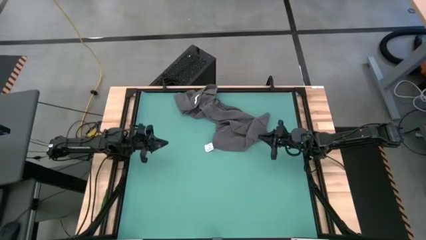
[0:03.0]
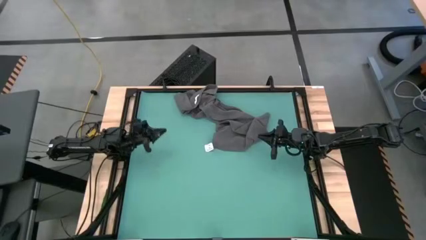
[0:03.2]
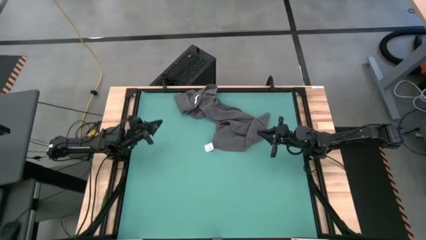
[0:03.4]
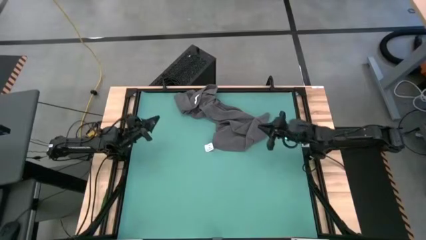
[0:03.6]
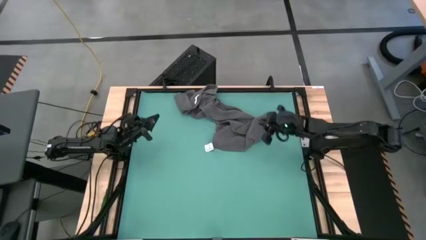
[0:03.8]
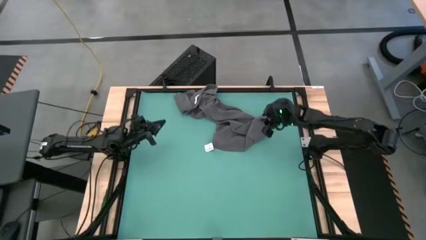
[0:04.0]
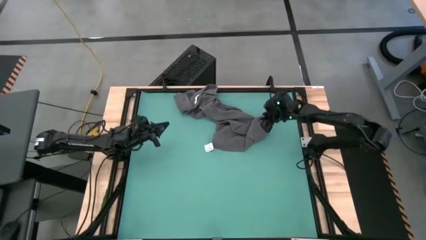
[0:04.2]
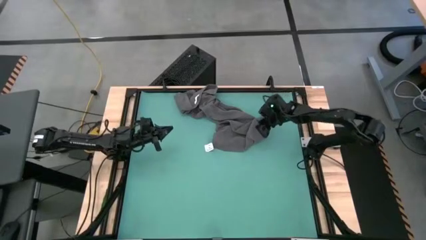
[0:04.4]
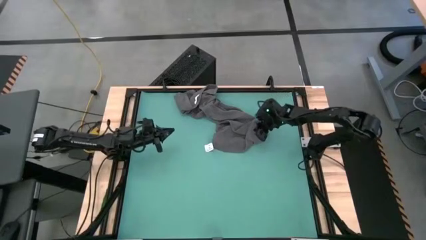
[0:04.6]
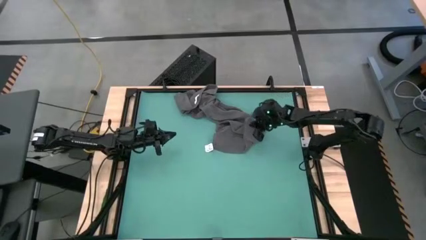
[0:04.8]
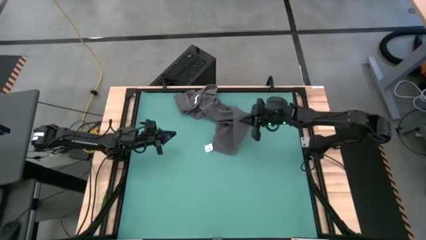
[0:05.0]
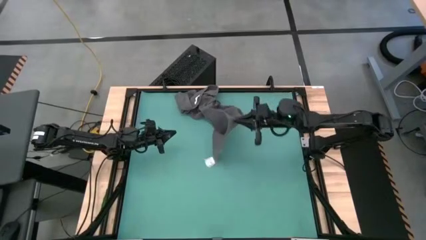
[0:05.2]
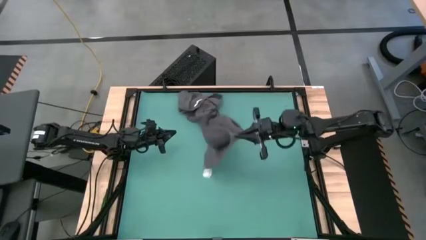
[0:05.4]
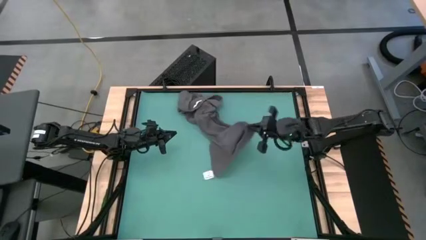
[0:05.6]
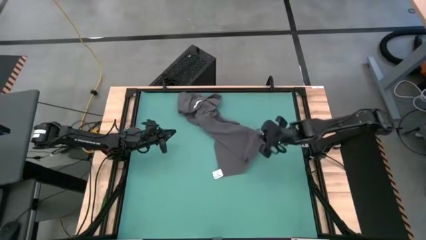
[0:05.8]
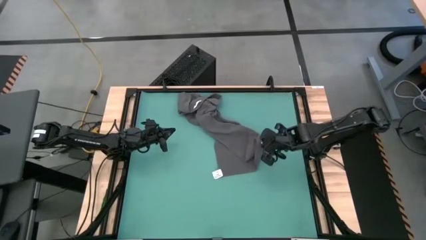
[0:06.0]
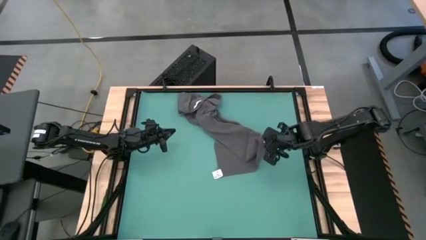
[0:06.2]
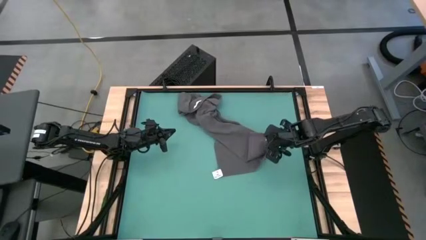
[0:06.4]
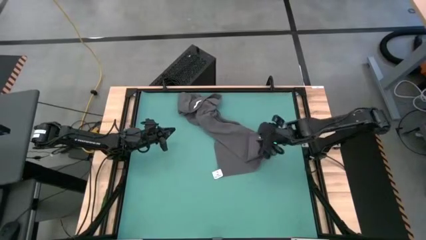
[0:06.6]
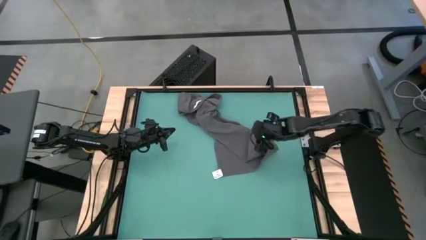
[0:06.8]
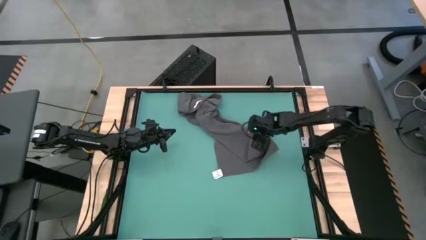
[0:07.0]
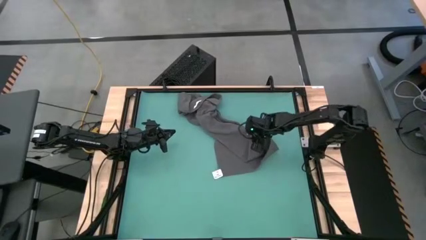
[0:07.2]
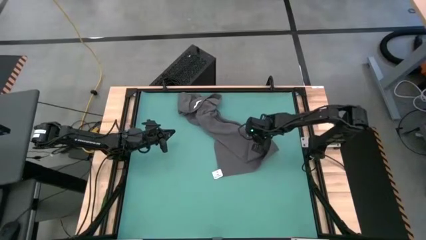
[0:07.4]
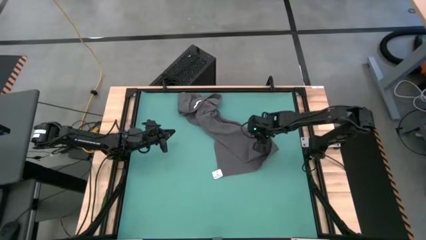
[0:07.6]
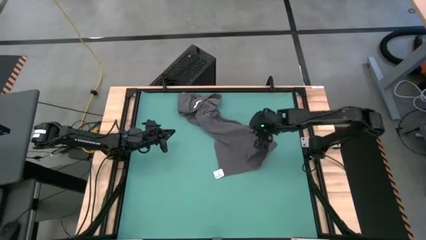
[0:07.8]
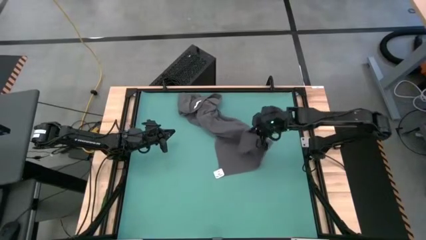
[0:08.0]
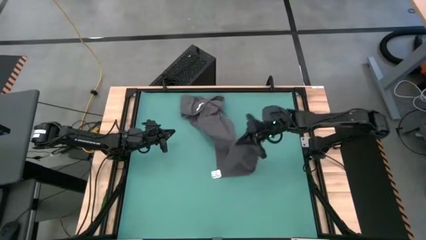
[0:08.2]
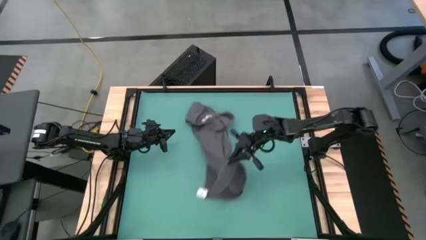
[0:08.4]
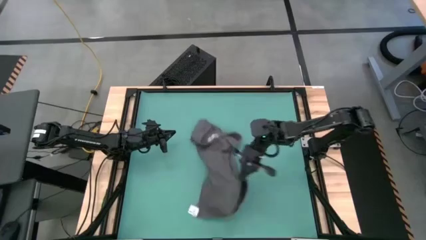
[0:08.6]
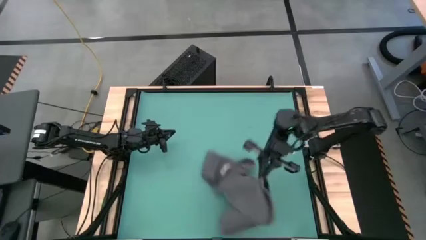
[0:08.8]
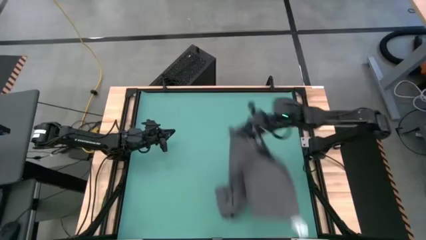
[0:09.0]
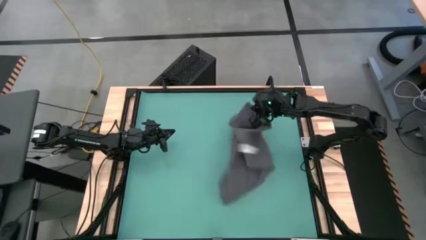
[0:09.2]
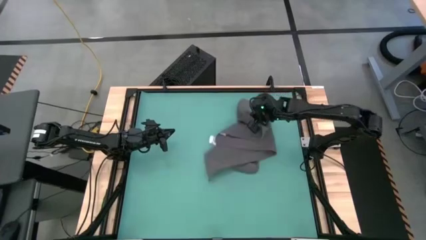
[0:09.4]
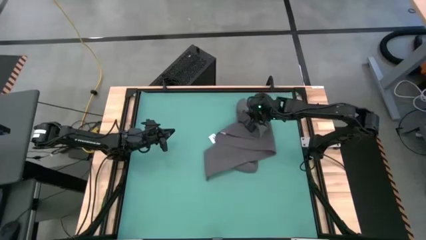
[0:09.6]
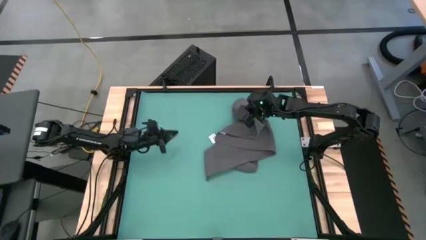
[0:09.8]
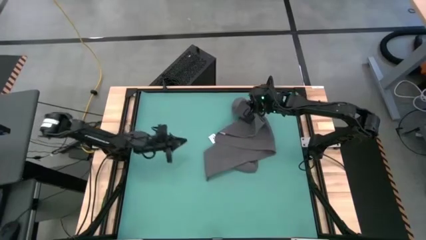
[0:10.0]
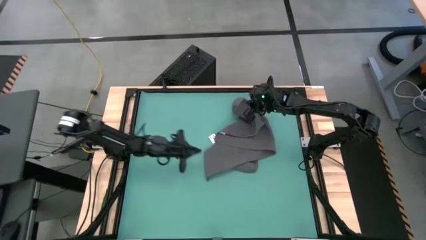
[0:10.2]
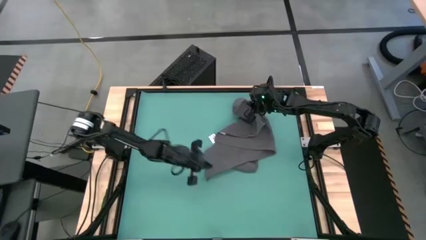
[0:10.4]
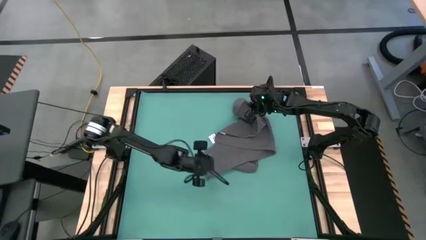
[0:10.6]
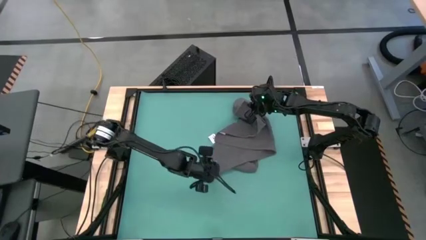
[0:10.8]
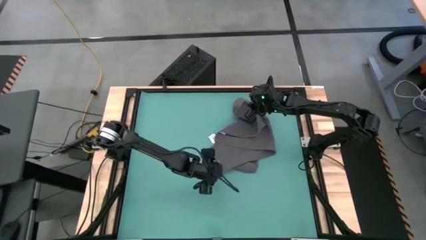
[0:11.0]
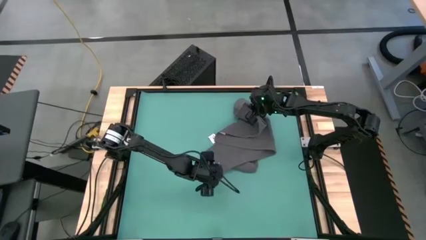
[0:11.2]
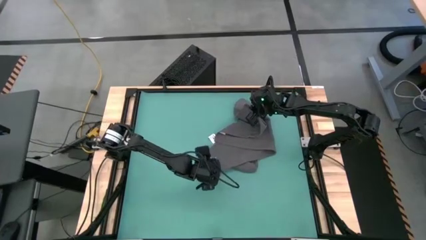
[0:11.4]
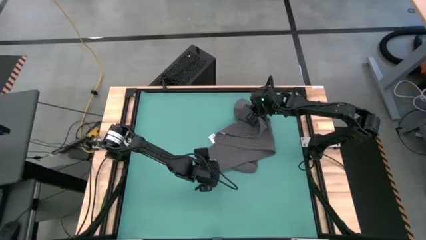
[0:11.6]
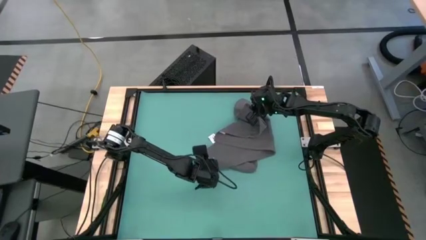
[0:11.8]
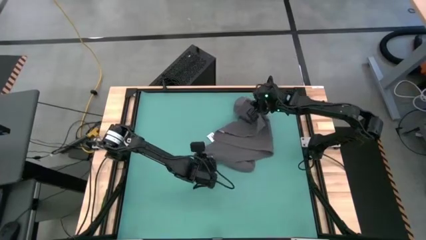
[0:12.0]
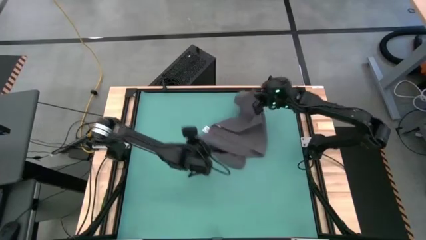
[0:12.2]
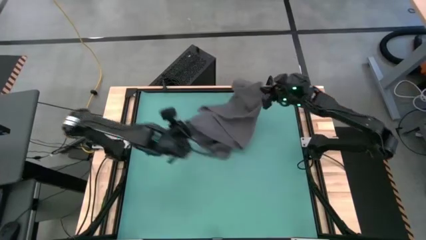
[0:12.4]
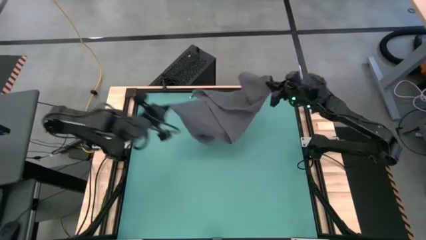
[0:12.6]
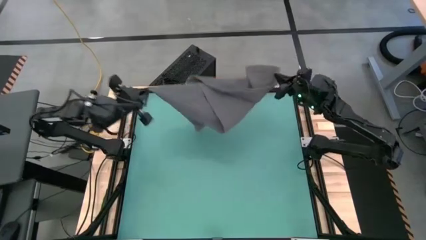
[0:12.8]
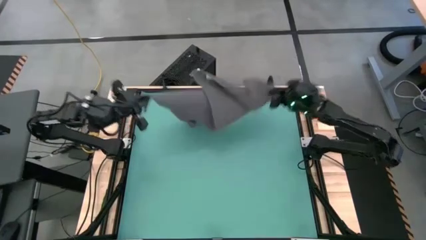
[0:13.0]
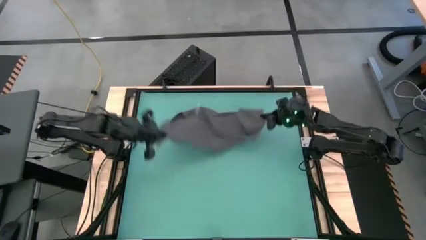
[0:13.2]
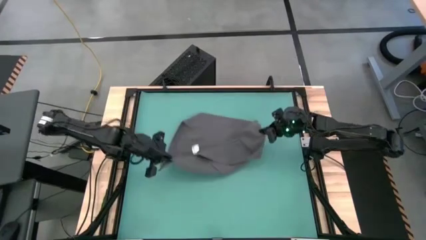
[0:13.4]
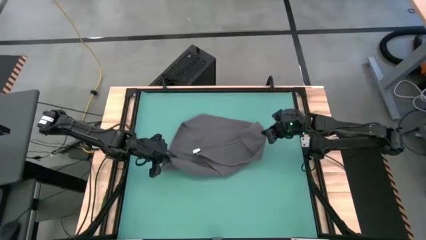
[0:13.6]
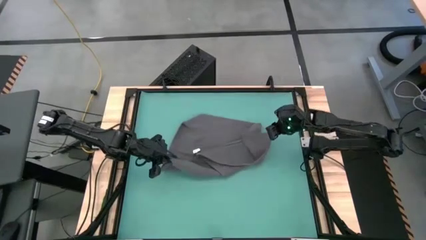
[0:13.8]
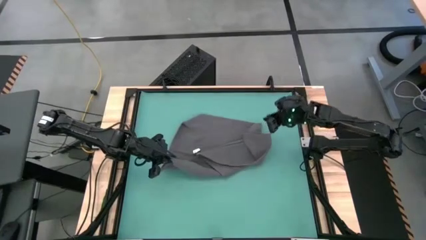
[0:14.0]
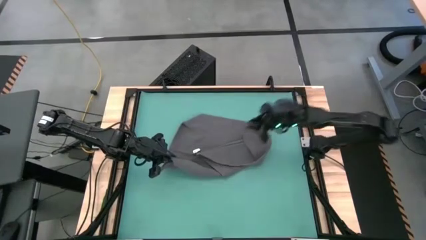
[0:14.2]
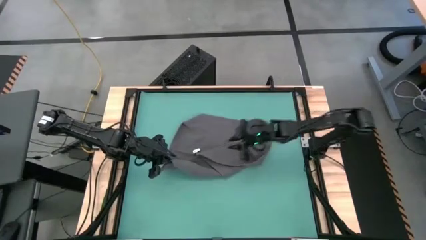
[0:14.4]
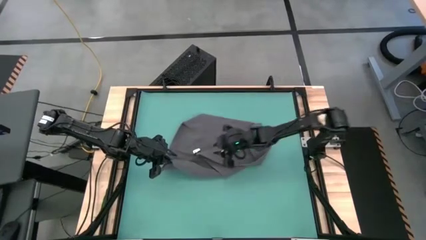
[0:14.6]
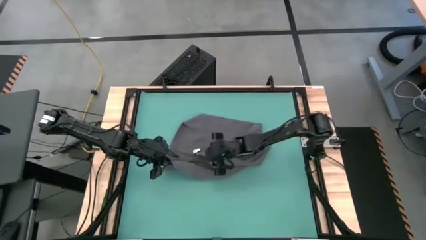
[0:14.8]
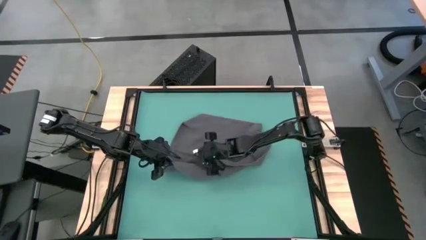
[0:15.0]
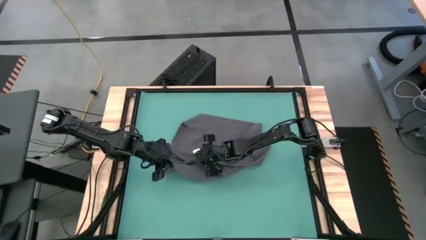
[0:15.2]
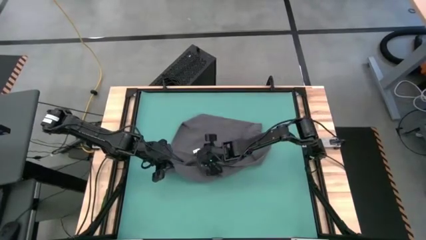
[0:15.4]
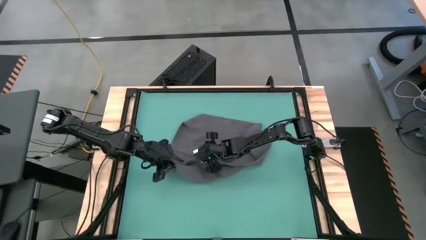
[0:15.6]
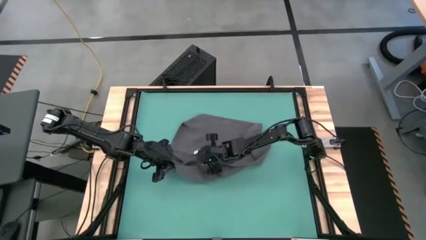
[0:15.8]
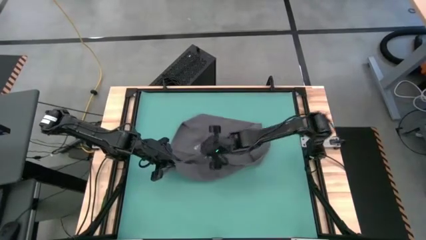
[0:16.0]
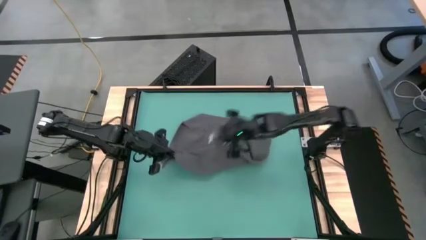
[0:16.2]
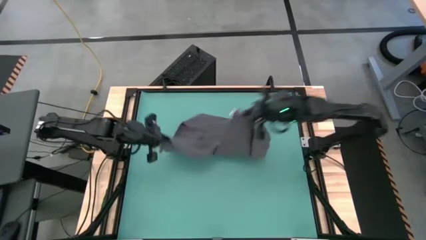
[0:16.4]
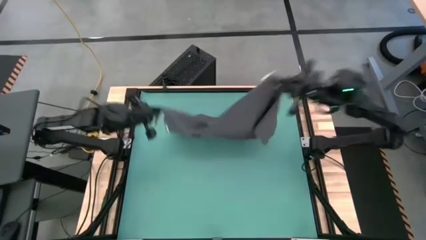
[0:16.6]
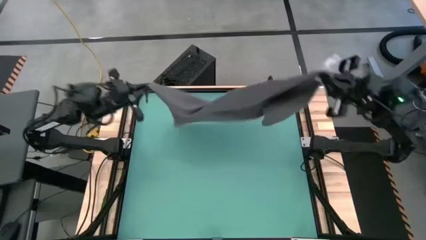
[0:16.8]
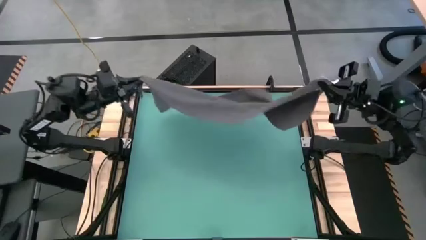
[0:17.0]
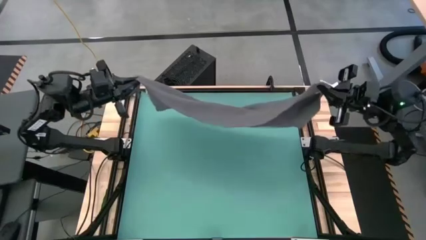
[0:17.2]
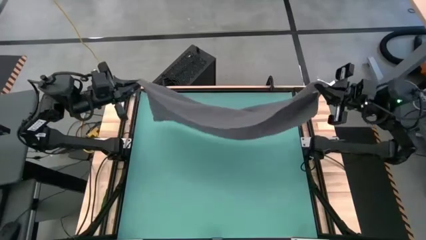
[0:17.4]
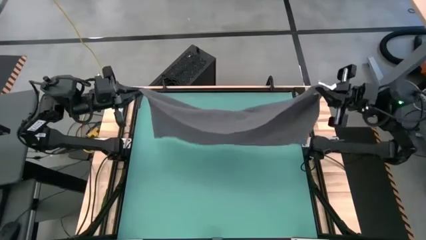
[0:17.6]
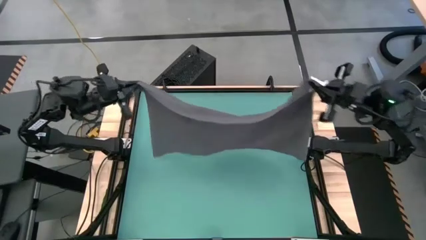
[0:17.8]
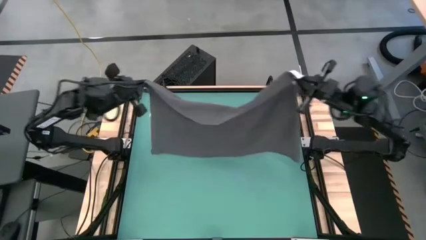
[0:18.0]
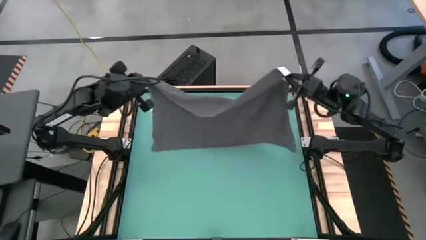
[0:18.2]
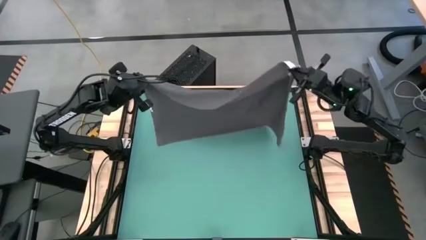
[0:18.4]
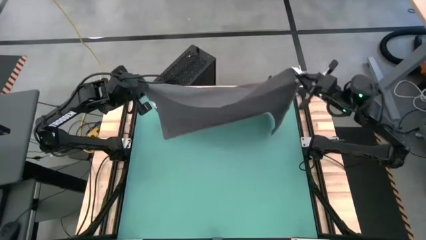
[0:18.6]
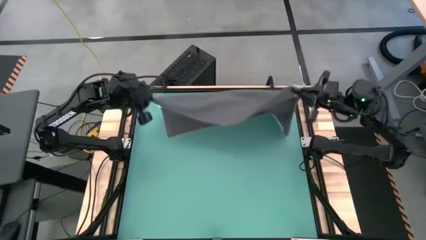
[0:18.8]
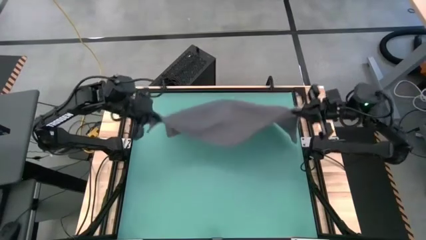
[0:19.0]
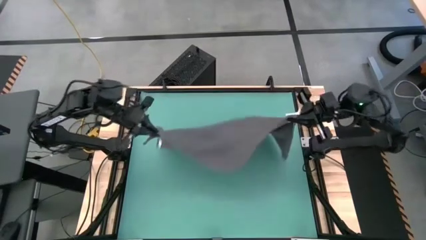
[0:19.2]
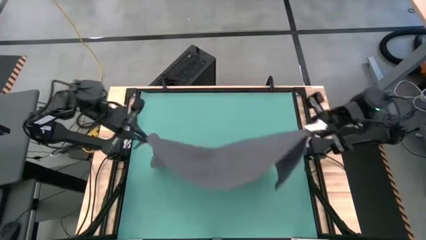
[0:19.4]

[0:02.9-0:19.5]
Task: Roll towel into tight, uniform cylinder
Fold the gray towel
